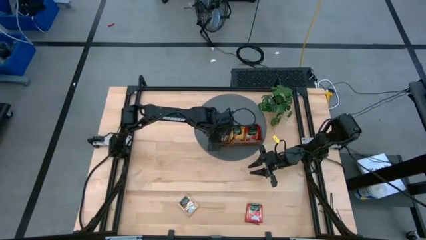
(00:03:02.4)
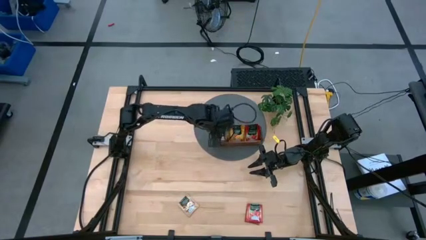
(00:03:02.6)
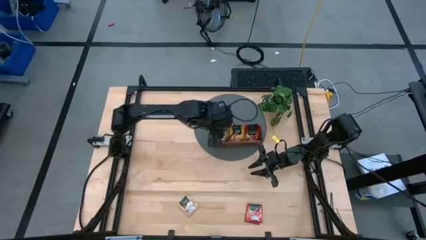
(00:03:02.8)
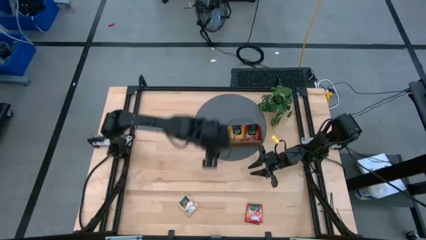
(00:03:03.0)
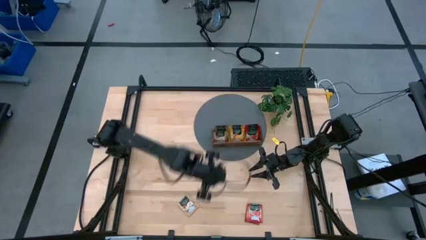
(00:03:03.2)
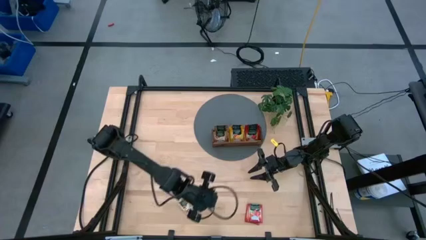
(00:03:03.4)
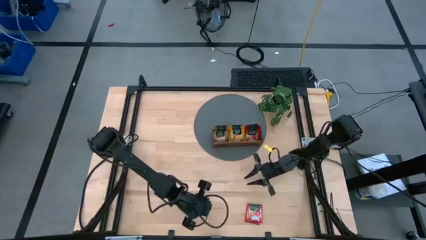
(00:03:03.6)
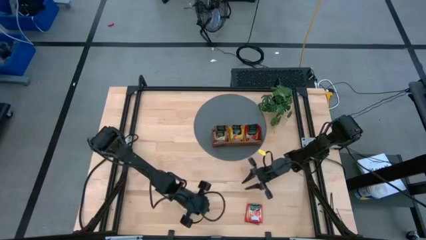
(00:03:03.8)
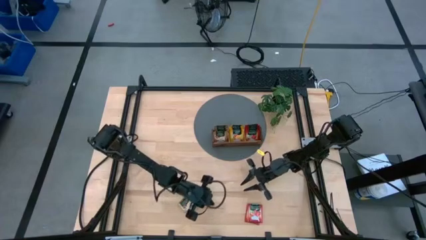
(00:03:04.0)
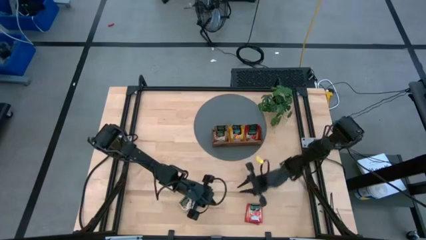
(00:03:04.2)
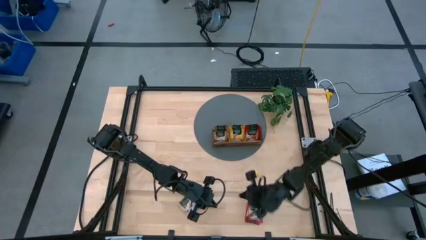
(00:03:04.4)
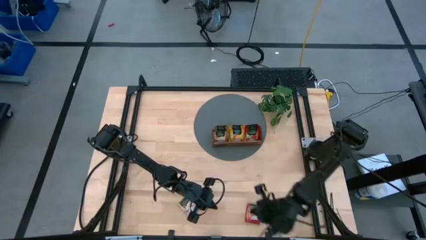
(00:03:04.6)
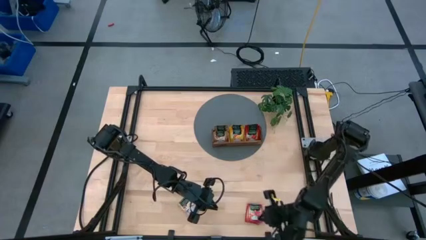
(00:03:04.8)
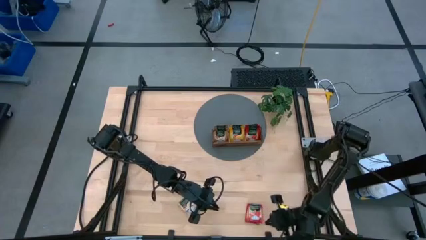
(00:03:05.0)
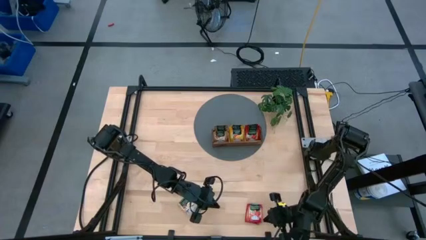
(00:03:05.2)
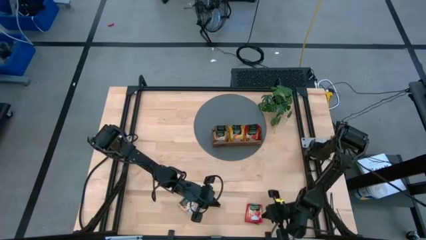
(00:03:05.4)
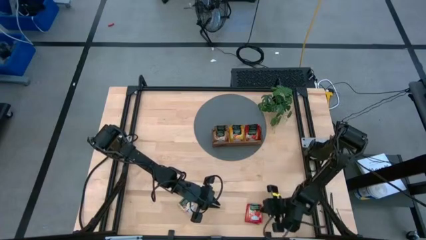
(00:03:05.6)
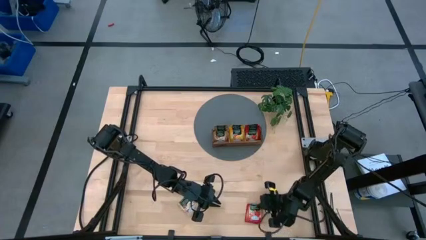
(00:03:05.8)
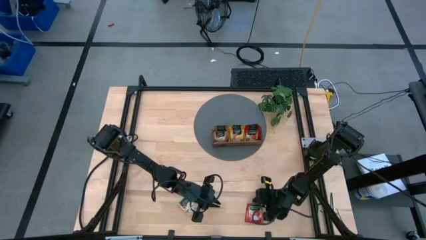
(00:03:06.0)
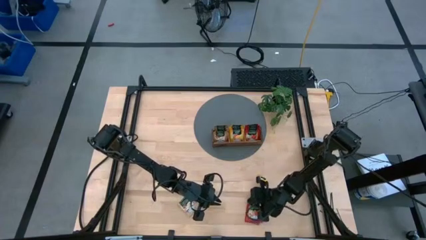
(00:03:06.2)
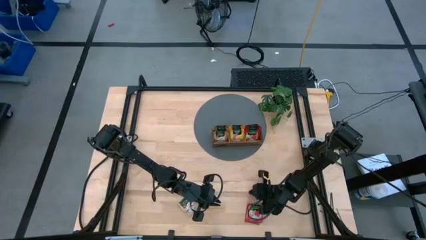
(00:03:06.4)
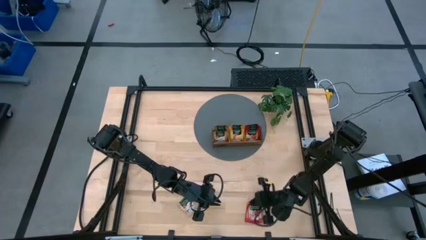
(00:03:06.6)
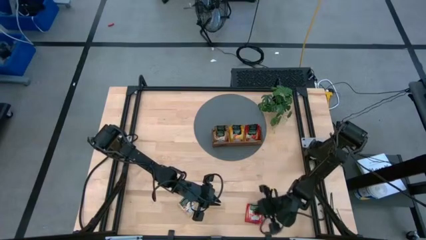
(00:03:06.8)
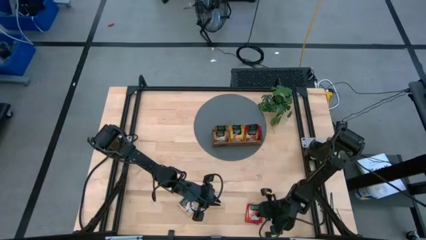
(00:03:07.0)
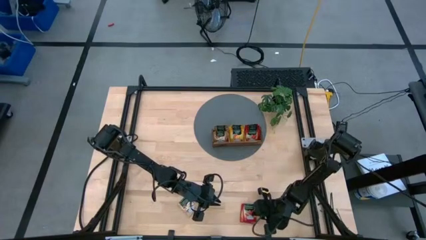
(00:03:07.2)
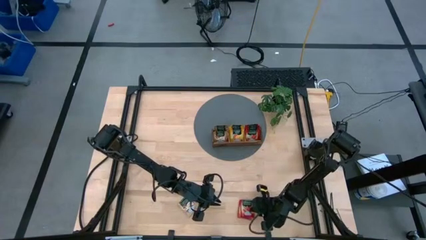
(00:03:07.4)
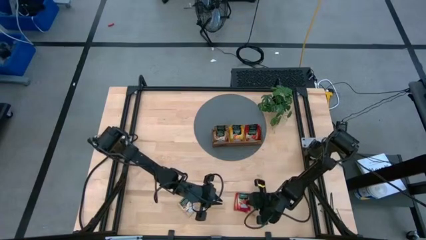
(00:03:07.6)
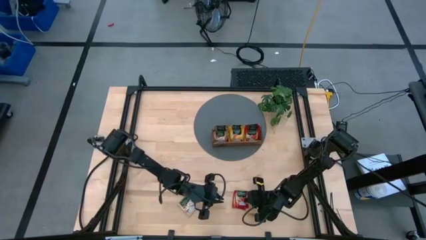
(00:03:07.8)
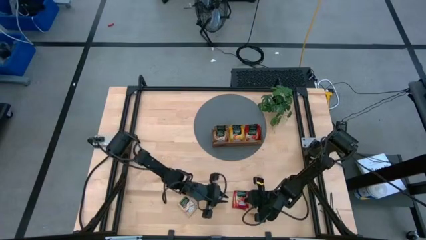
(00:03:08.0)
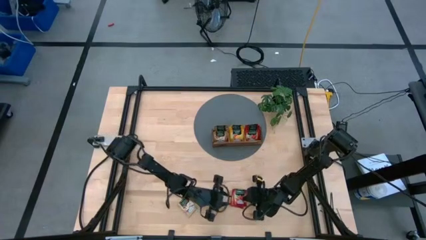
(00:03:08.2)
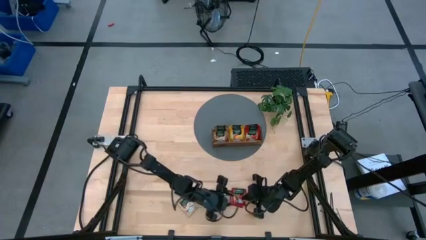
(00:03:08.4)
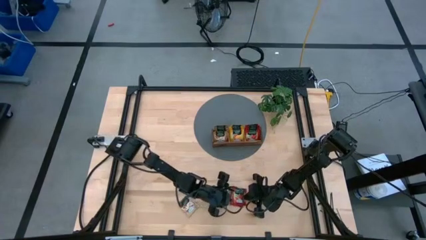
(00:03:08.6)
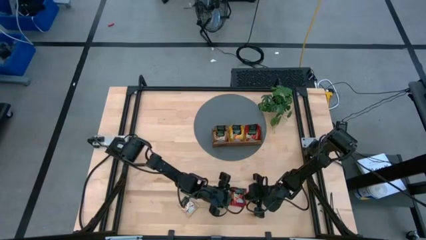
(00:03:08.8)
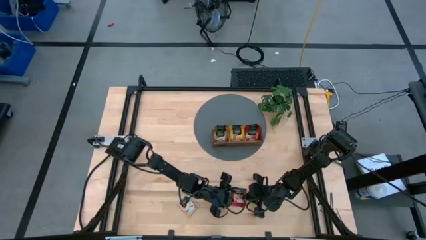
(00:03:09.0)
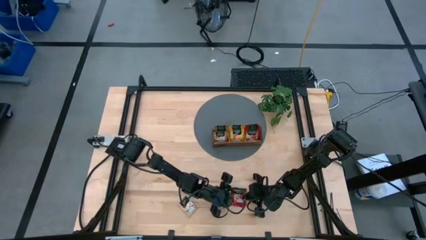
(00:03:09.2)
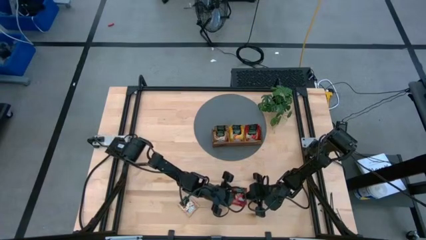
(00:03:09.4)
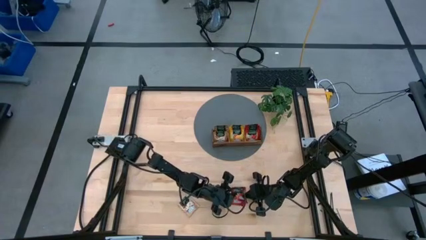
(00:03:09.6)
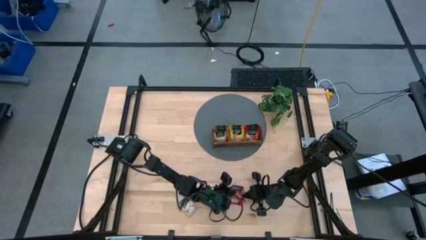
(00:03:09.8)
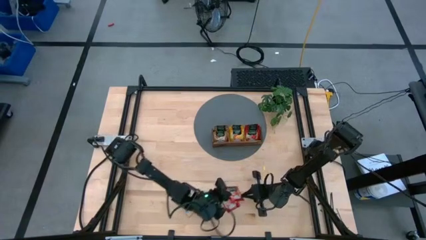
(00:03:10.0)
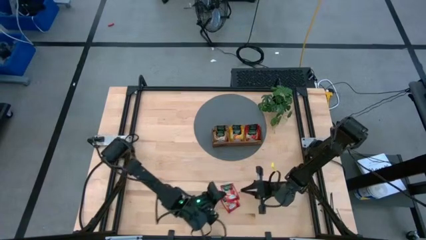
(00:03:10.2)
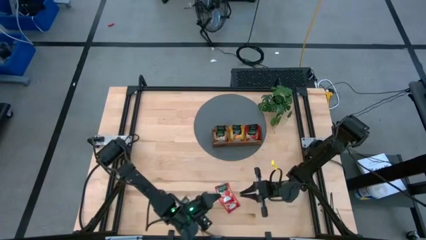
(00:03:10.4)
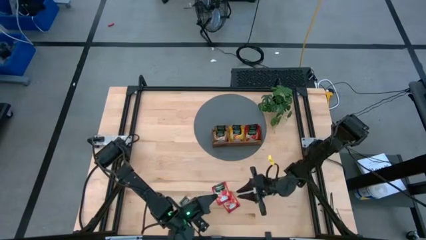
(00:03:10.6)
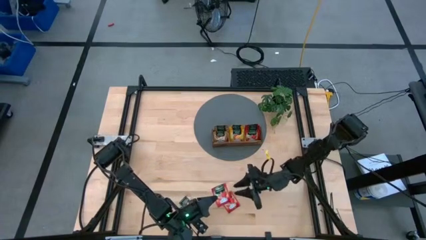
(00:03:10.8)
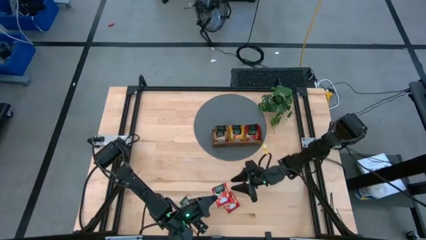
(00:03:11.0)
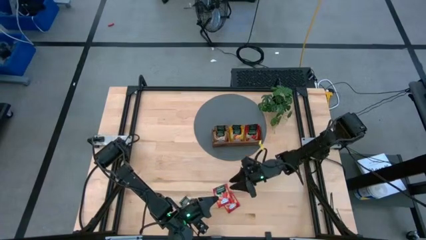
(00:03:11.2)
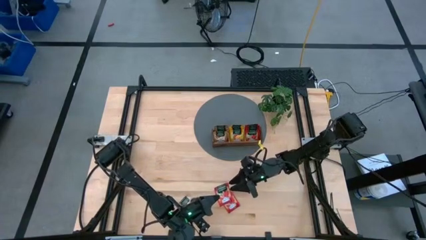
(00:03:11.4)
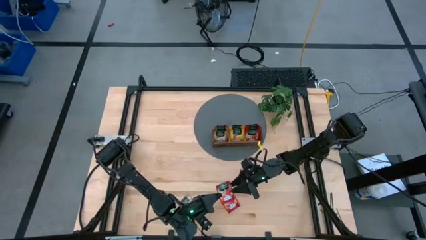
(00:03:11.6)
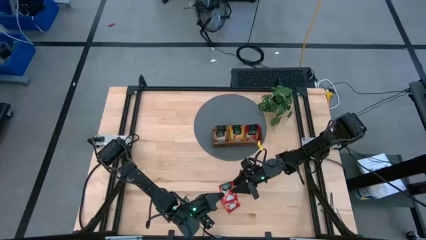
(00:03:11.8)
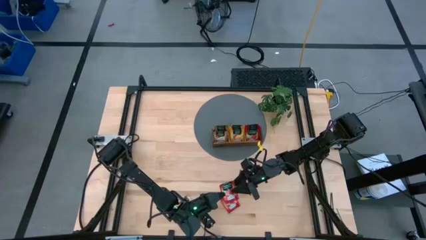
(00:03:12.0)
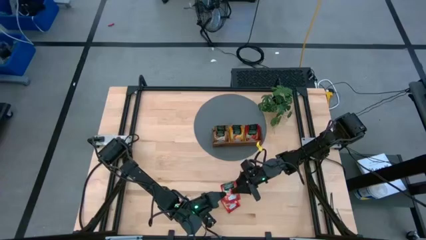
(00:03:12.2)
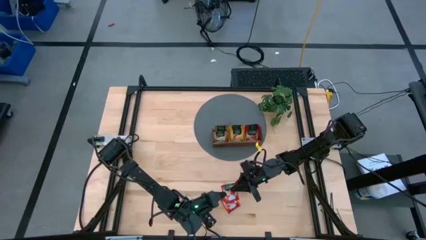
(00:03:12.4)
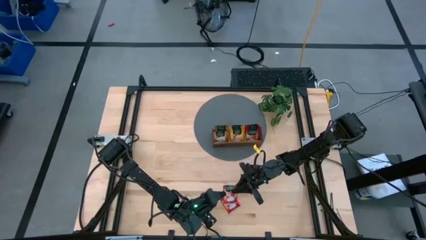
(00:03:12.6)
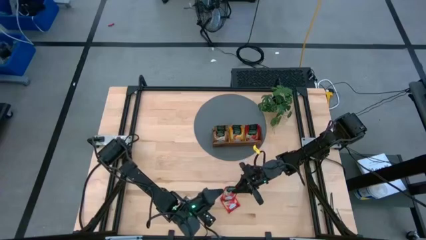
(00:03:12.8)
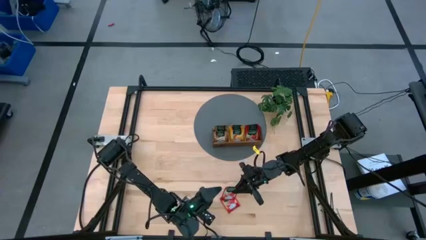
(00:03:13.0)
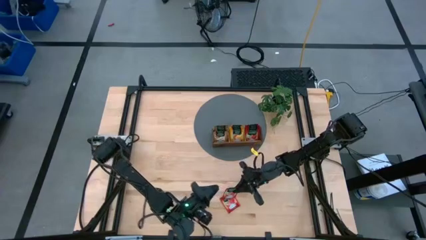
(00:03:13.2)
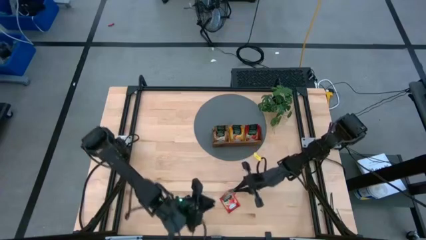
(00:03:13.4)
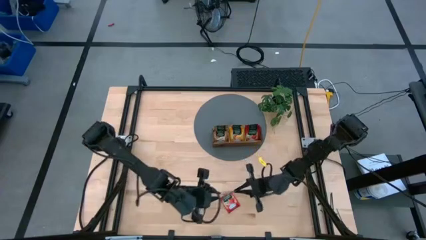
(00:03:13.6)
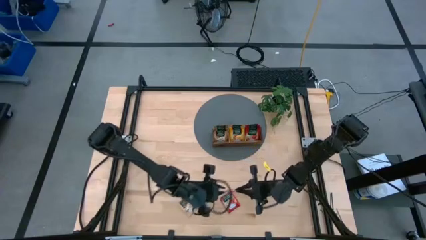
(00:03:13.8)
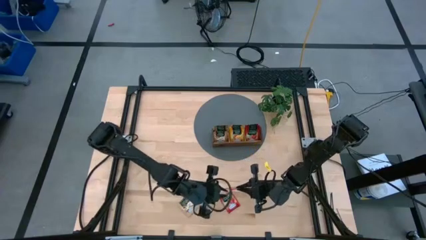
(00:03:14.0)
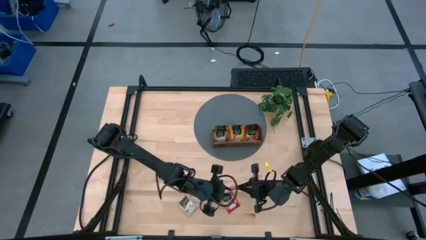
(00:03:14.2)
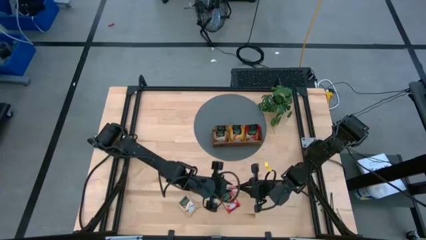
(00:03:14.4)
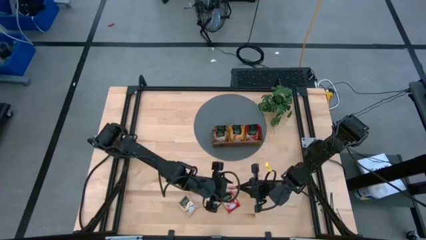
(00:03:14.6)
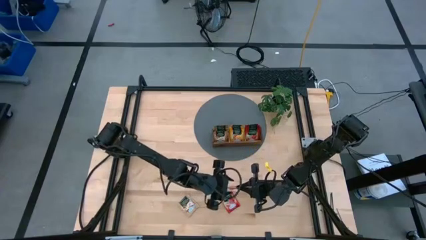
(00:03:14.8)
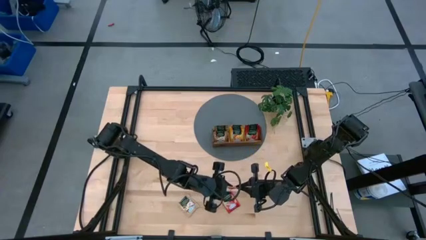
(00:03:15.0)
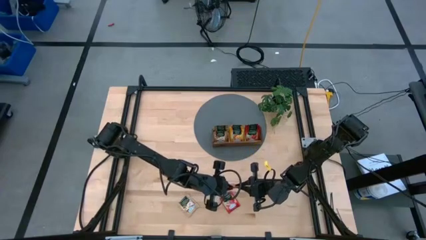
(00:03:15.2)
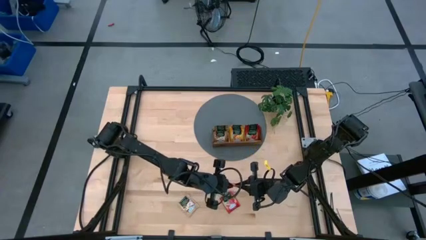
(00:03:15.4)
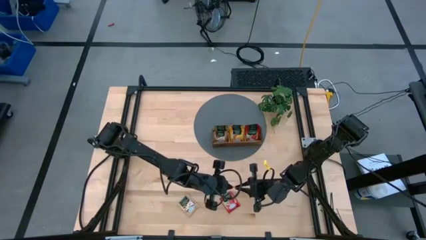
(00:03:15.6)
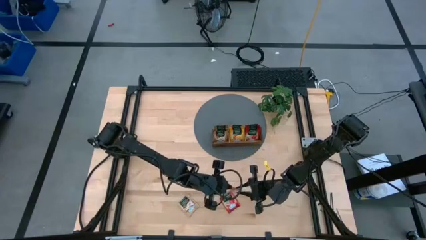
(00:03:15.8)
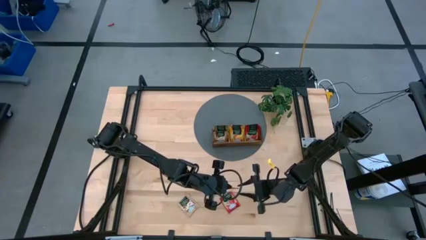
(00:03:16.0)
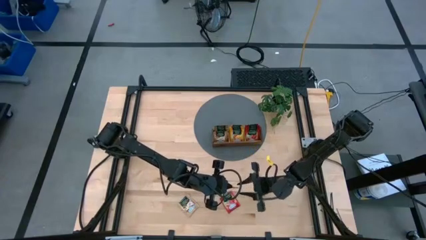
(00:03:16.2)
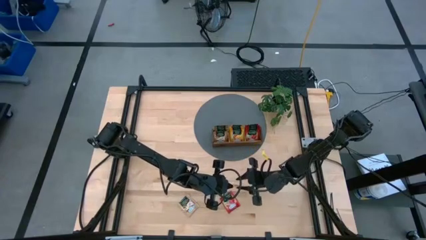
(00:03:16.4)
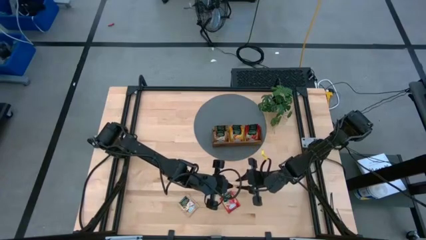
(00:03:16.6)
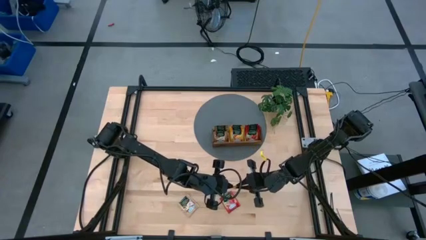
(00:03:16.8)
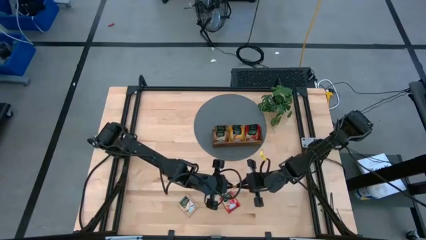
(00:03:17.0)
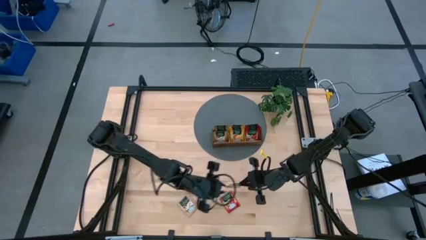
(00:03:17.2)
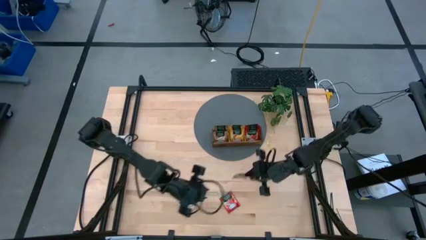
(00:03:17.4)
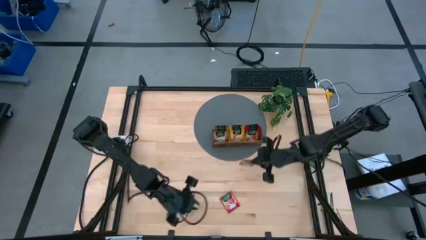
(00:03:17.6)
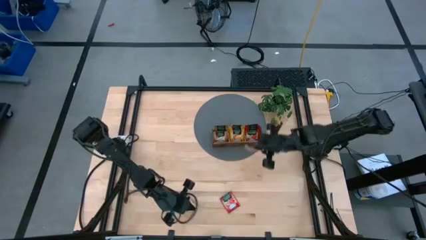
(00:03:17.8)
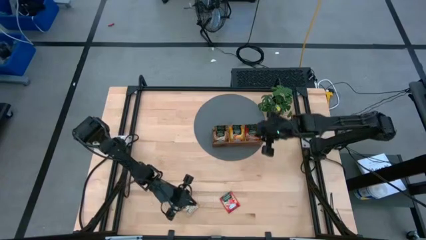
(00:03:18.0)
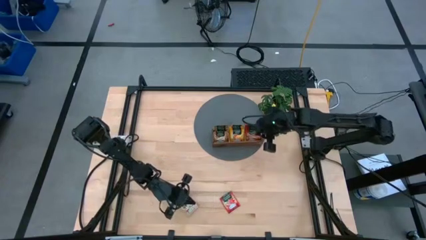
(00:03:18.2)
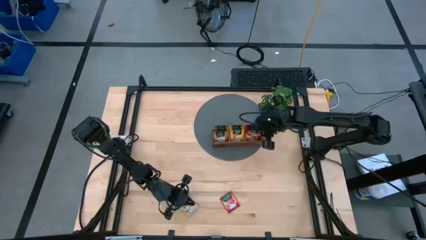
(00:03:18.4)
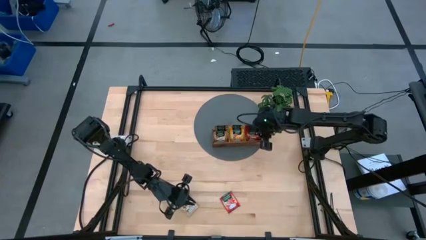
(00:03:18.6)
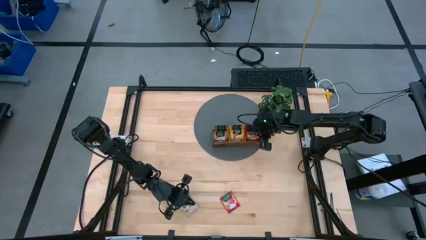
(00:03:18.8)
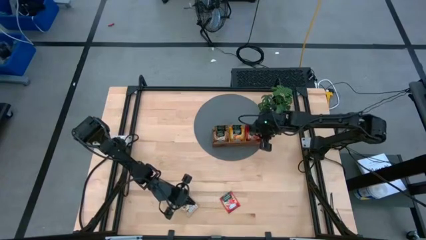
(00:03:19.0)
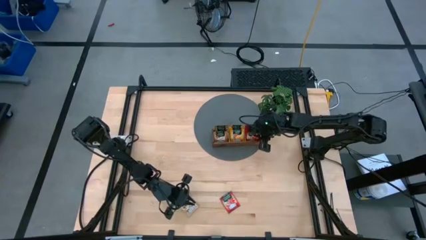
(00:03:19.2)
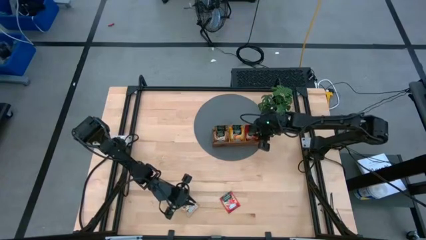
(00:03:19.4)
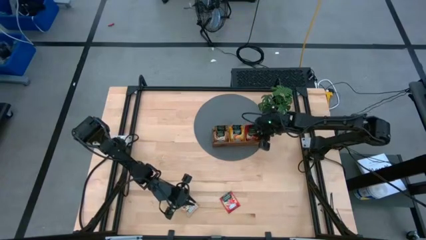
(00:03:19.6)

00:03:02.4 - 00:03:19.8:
Task: Pick & Place Tea
Put the right red tea packet into the right section of the wooden organizer
